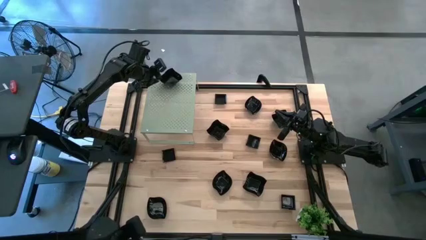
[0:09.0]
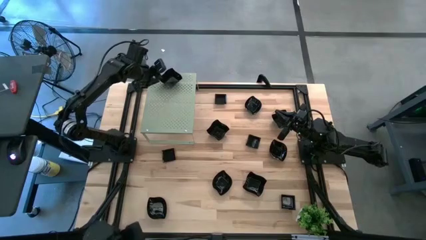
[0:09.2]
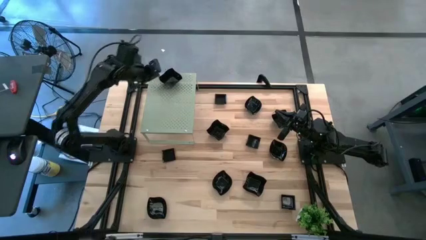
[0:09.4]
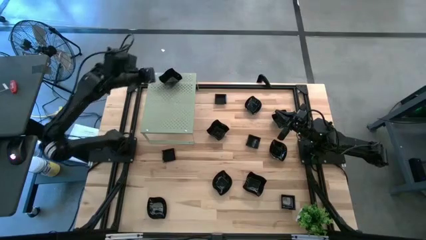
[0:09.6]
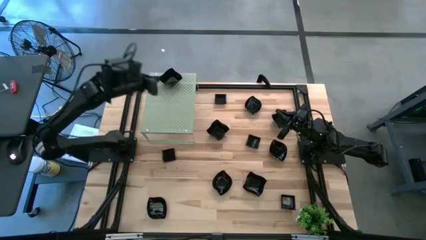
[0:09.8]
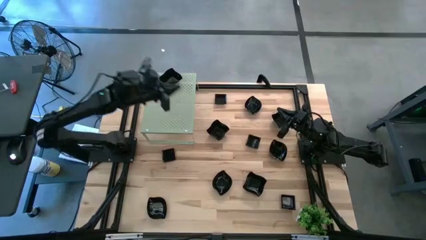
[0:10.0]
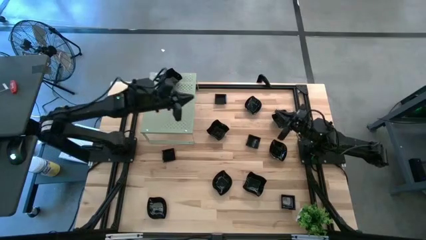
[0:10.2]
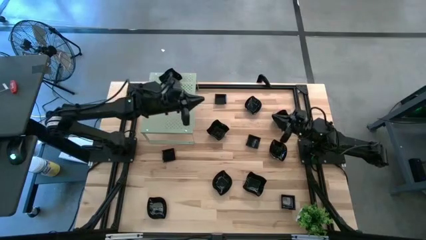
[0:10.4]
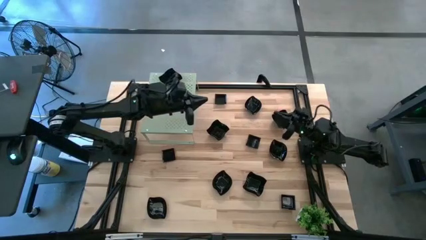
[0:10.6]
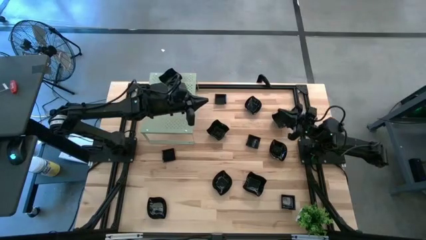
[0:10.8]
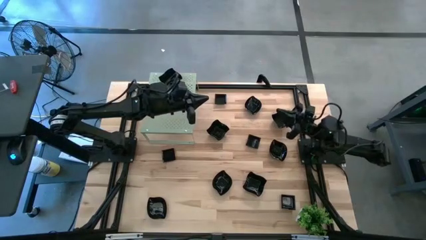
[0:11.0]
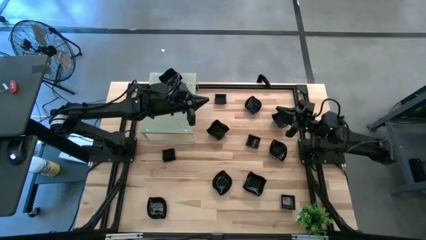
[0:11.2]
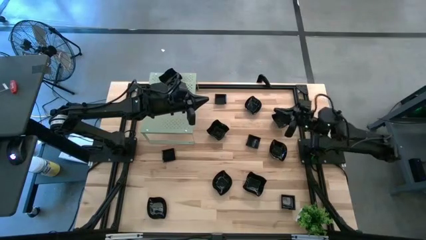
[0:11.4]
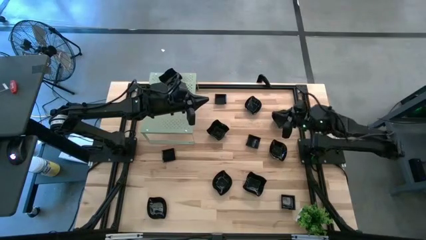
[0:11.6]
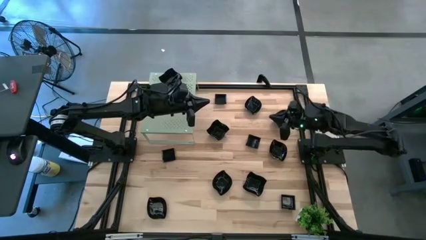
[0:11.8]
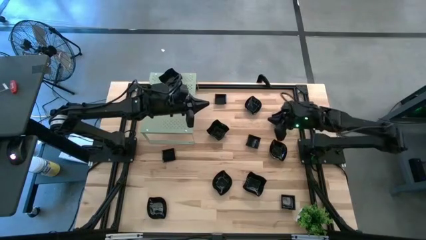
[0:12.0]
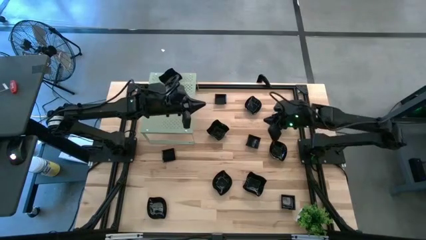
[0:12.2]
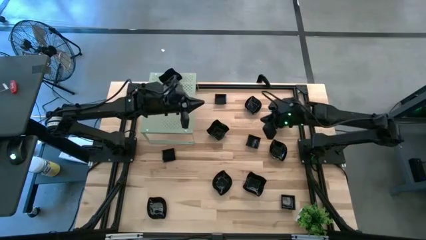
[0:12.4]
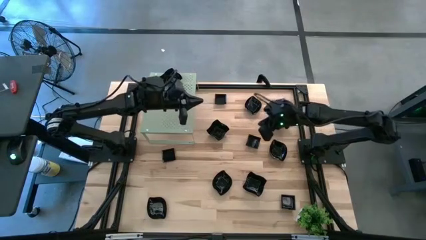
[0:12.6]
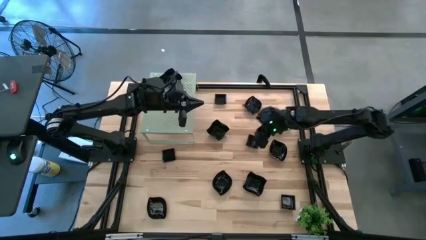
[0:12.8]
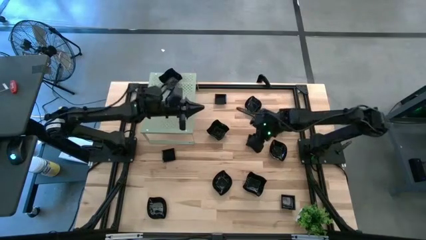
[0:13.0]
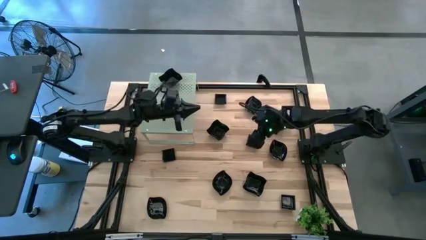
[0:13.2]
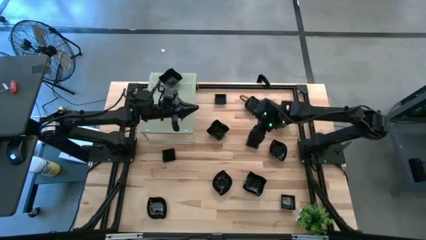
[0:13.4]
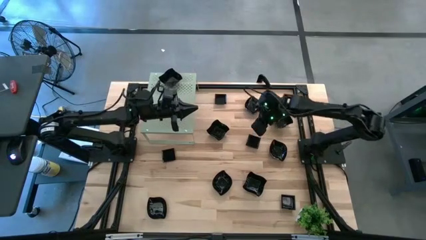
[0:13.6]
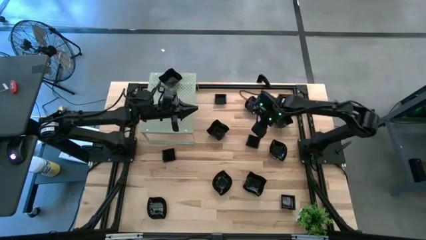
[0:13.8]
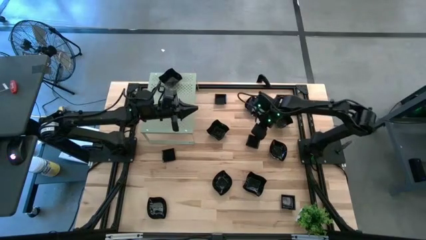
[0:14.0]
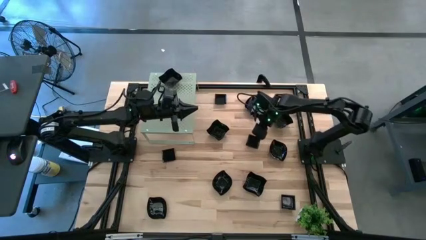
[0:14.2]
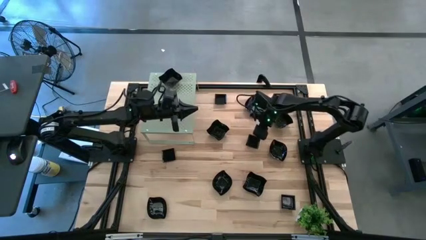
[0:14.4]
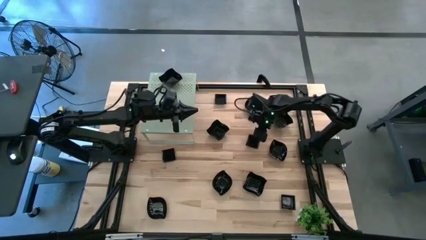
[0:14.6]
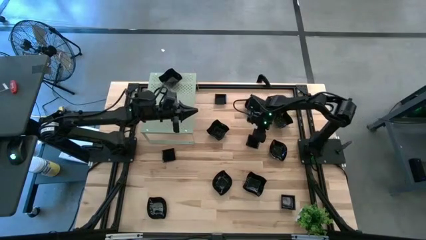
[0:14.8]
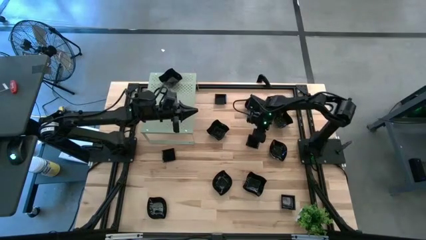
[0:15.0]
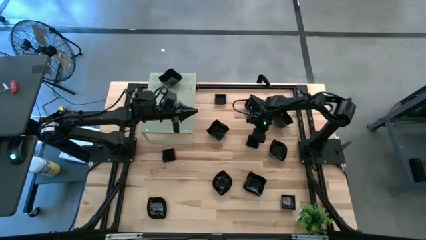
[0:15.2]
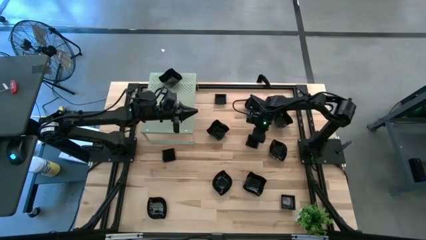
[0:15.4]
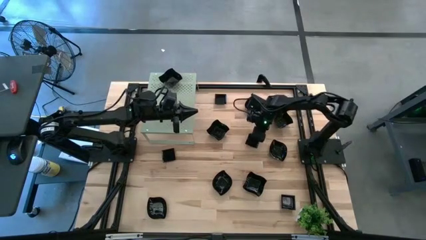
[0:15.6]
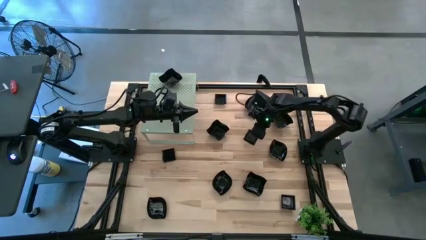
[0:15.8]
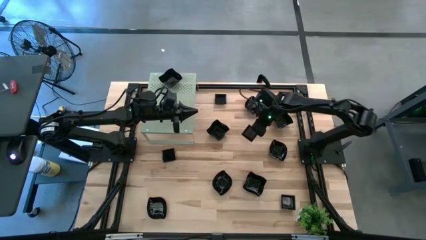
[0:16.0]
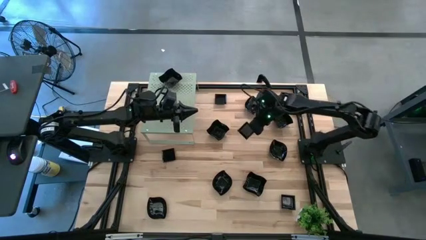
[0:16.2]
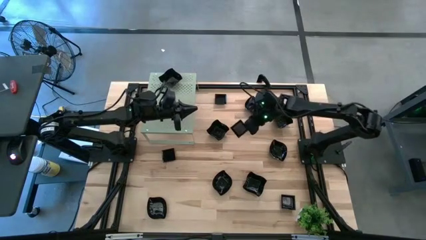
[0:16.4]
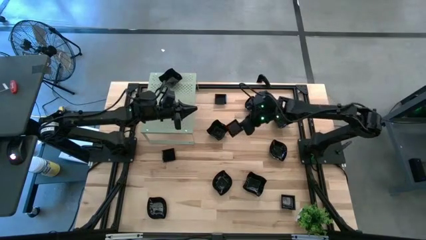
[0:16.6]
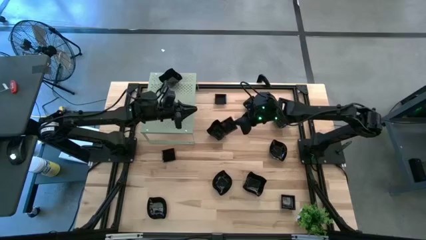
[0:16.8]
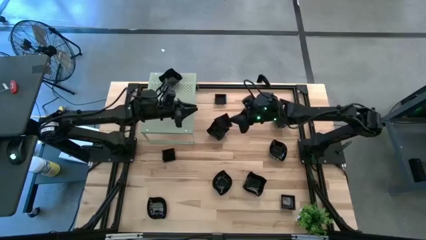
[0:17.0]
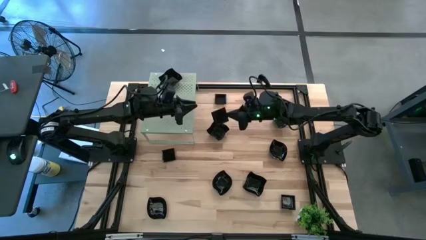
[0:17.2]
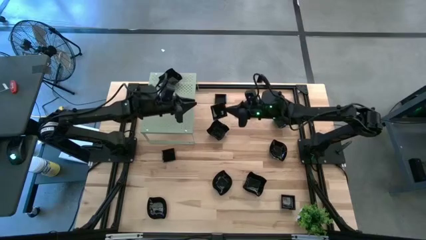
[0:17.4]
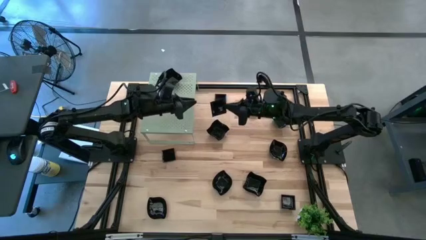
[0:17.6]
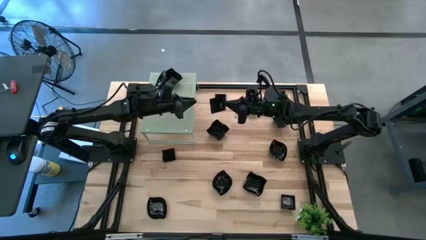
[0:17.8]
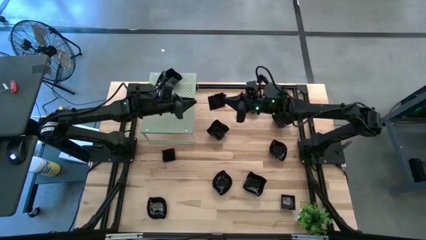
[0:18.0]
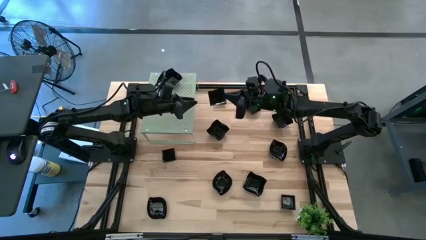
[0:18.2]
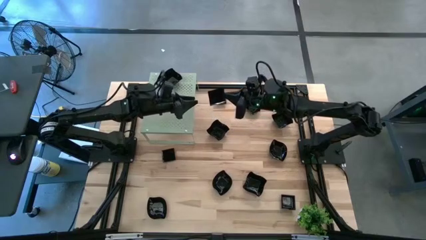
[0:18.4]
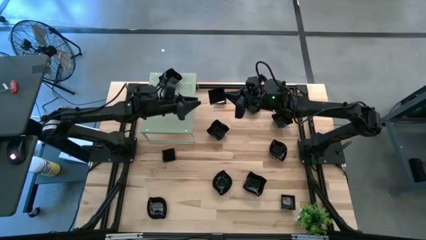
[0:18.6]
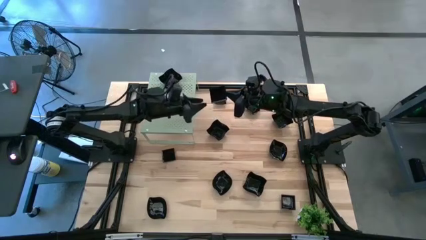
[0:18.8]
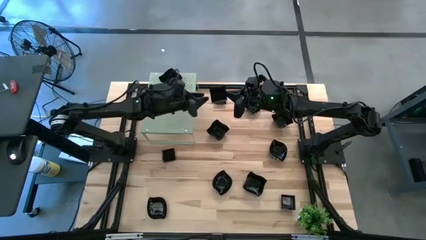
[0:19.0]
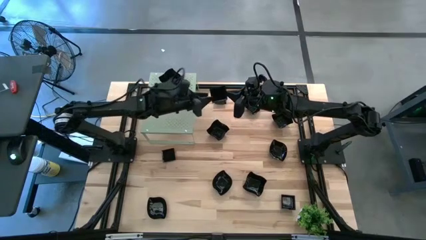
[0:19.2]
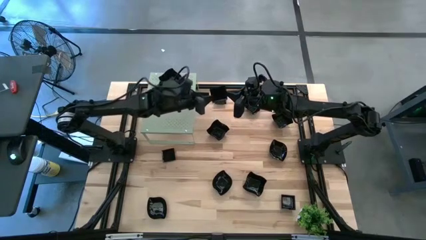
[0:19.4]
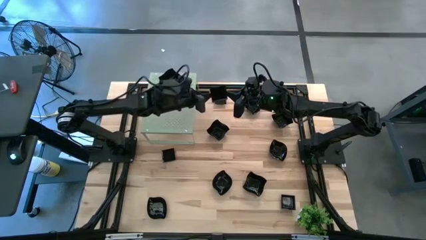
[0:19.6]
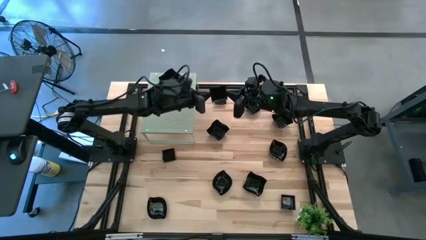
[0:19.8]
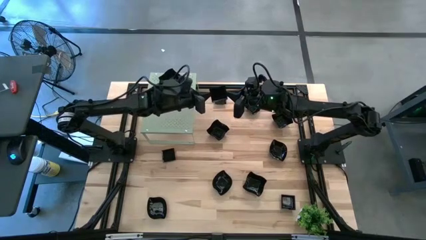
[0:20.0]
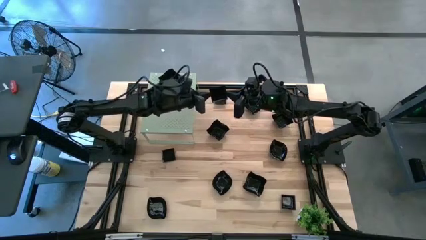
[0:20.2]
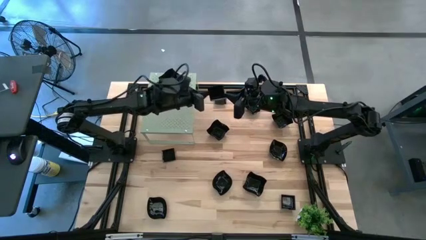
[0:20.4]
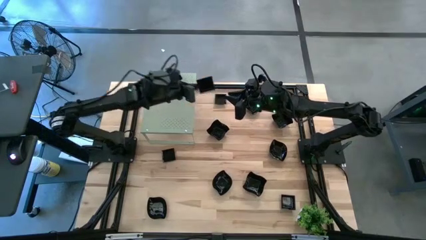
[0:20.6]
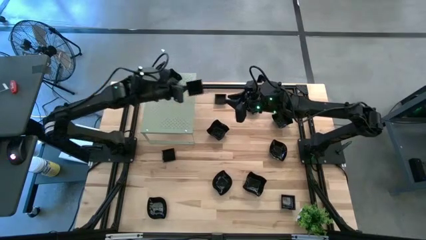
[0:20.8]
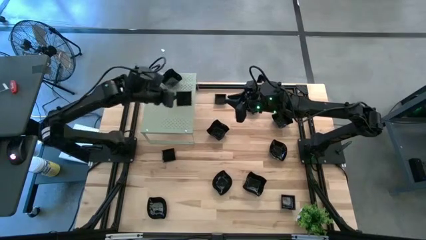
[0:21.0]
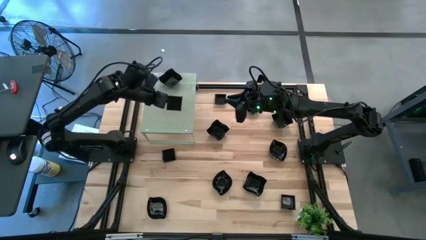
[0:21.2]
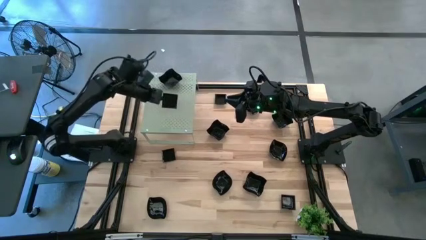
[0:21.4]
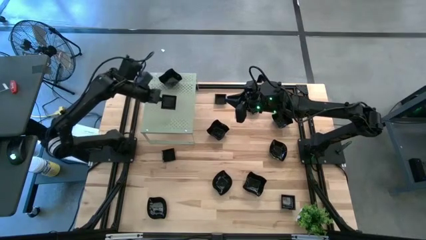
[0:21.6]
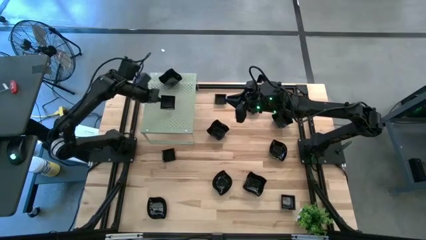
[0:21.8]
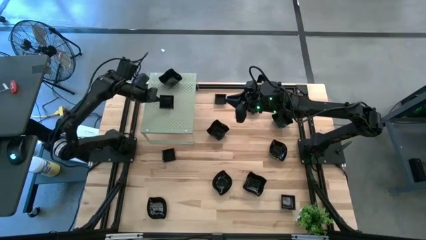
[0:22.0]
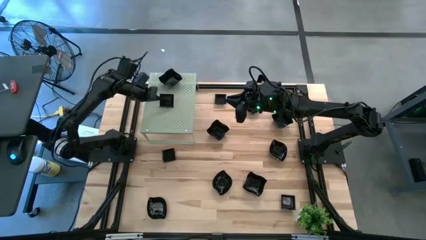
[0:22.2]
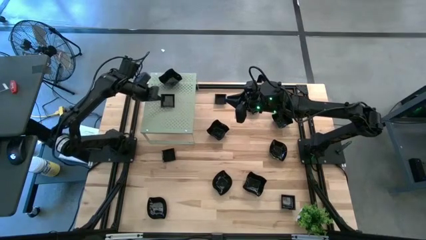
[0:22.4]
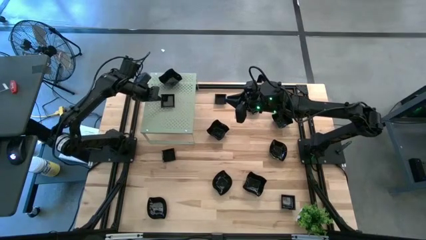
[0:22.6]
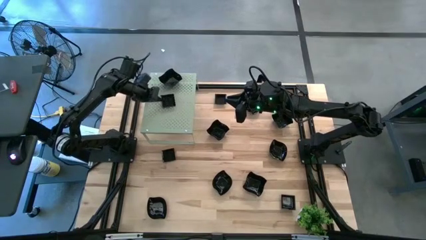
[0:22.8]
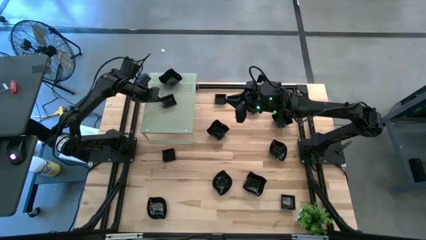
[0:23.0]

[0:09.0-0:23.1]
Task: Pick & Place Mini shaped plates
Put the square plate on the shelf
